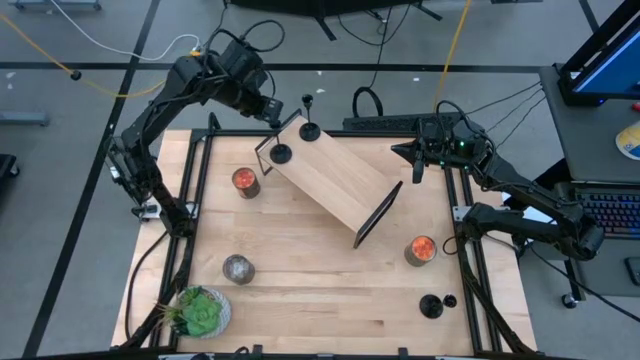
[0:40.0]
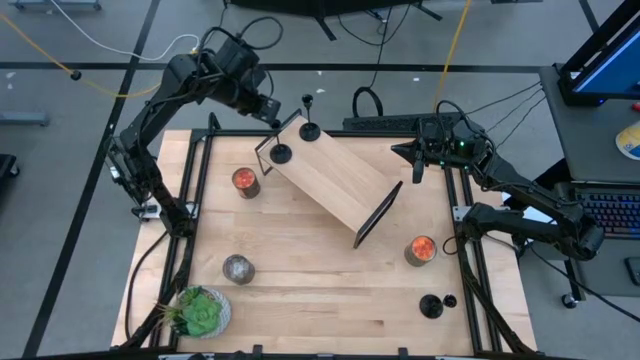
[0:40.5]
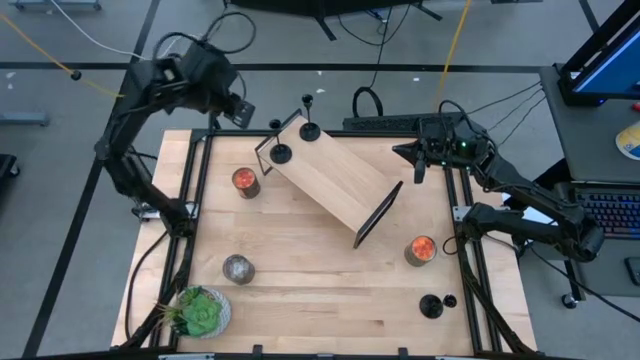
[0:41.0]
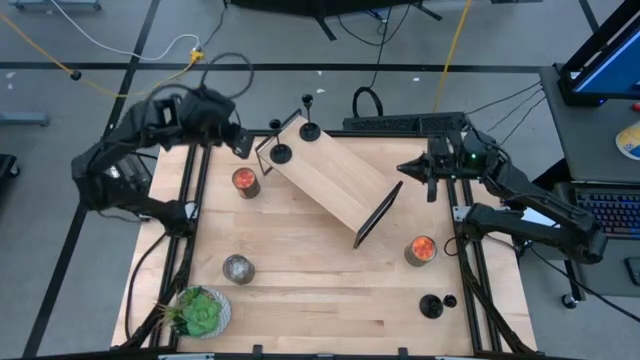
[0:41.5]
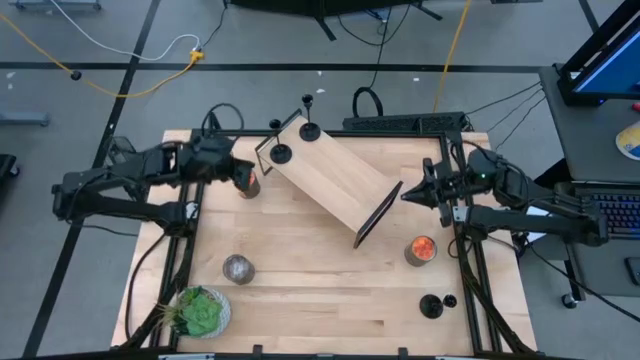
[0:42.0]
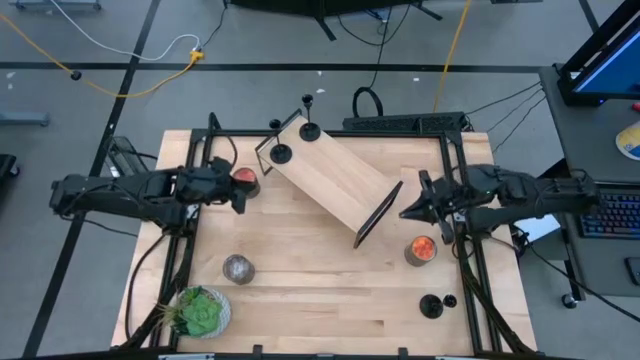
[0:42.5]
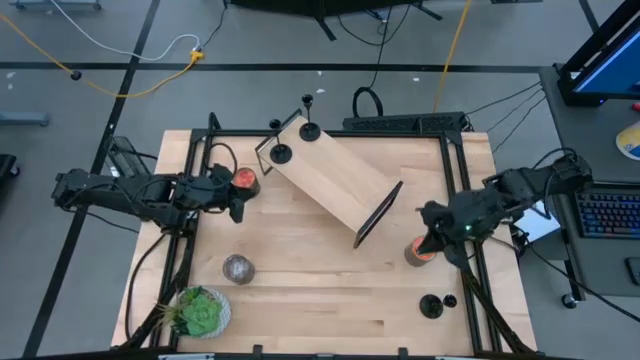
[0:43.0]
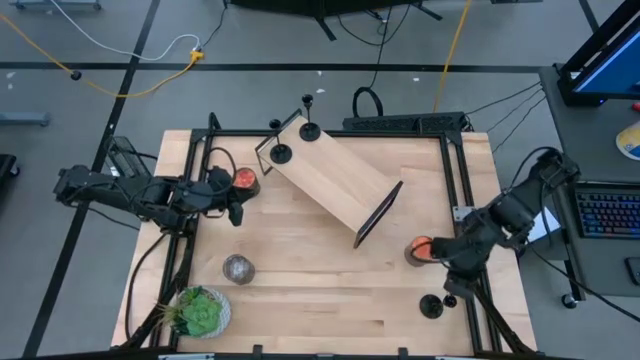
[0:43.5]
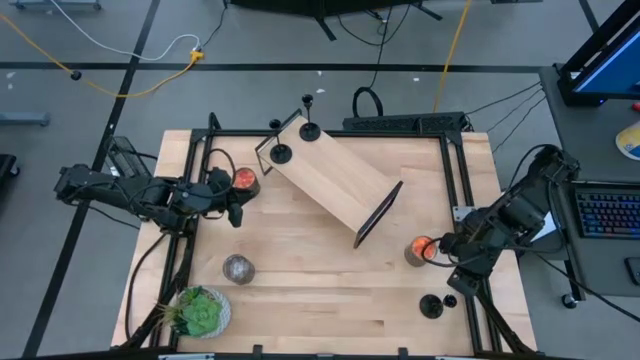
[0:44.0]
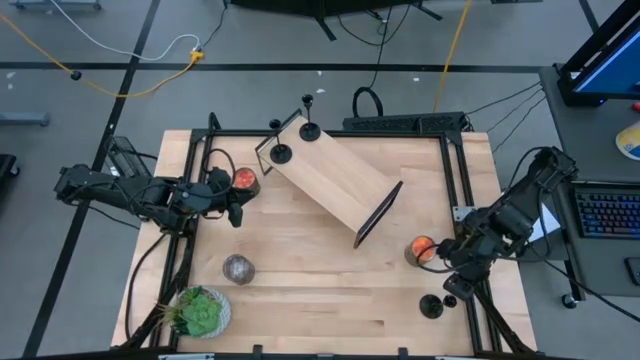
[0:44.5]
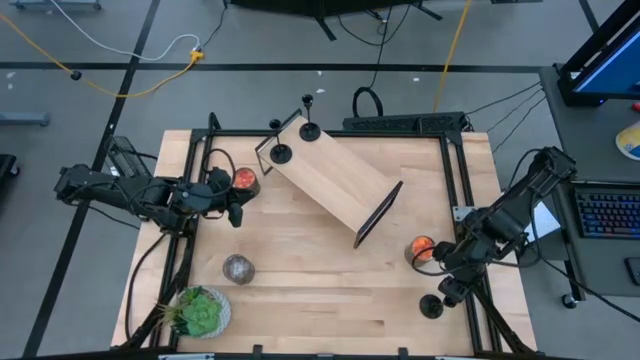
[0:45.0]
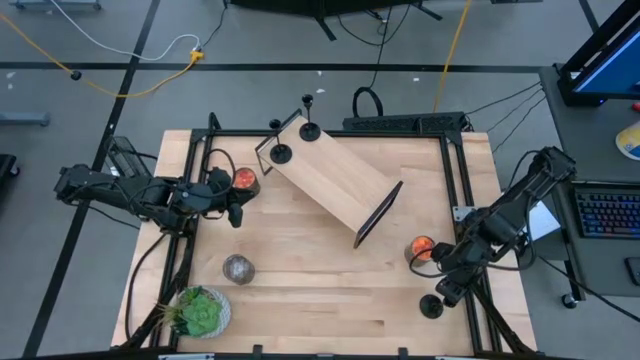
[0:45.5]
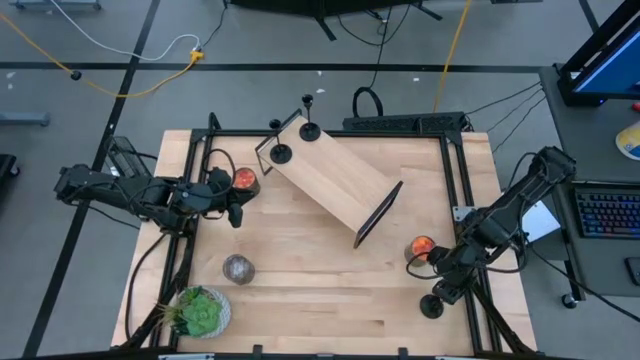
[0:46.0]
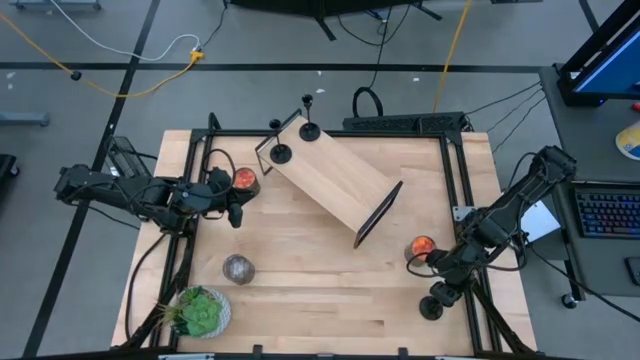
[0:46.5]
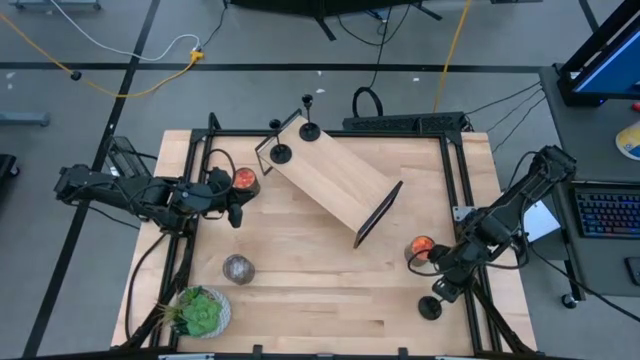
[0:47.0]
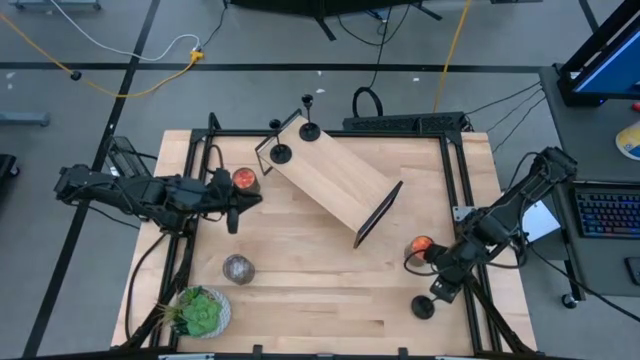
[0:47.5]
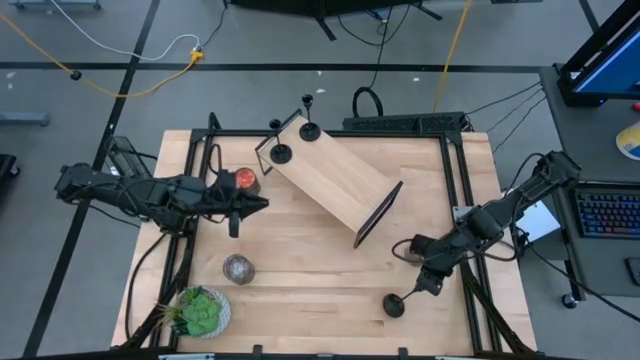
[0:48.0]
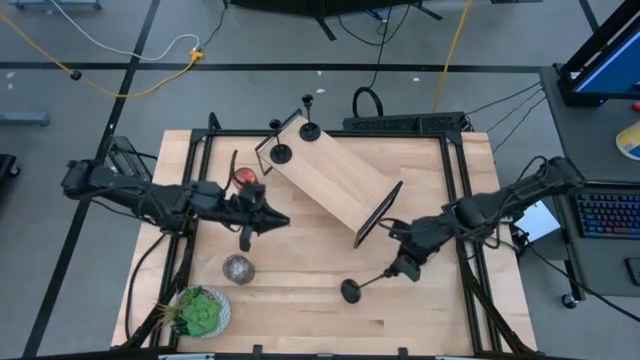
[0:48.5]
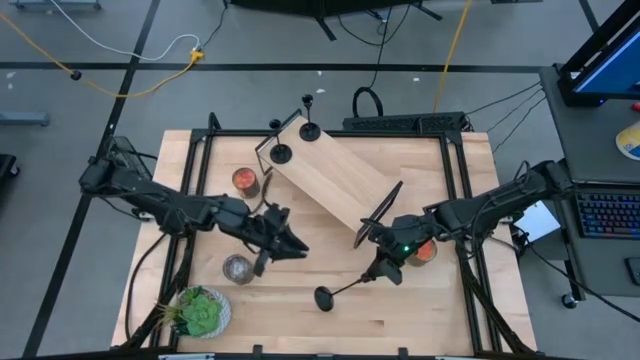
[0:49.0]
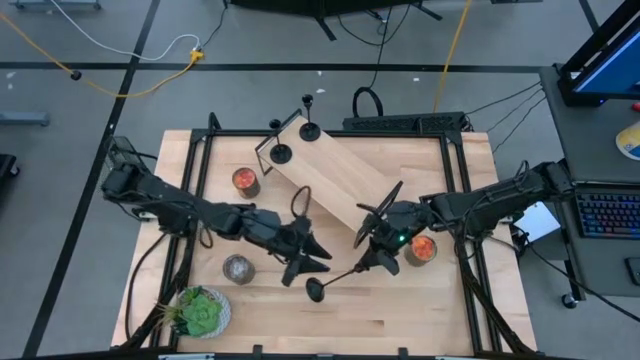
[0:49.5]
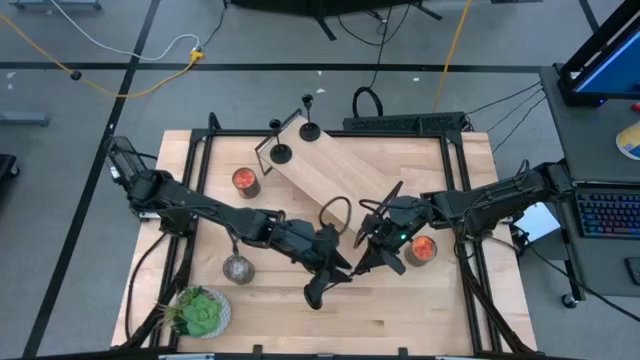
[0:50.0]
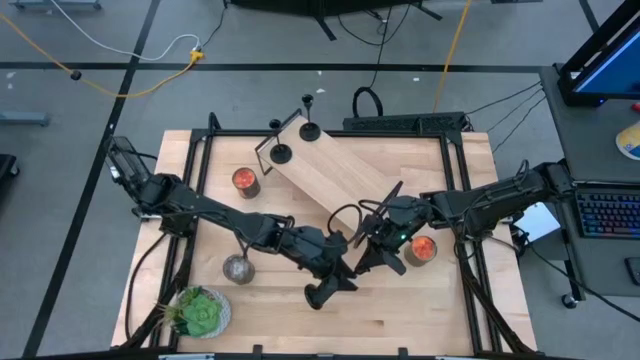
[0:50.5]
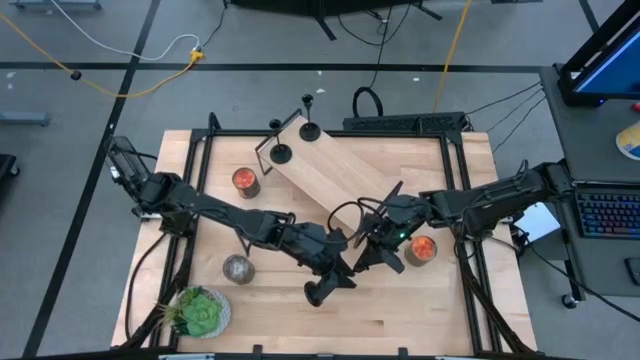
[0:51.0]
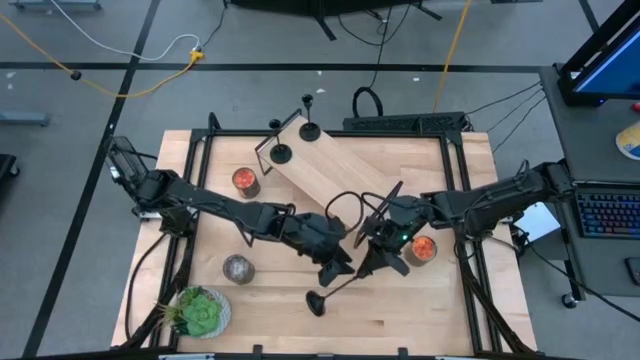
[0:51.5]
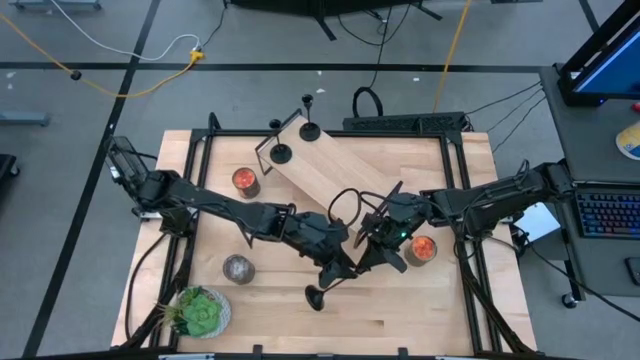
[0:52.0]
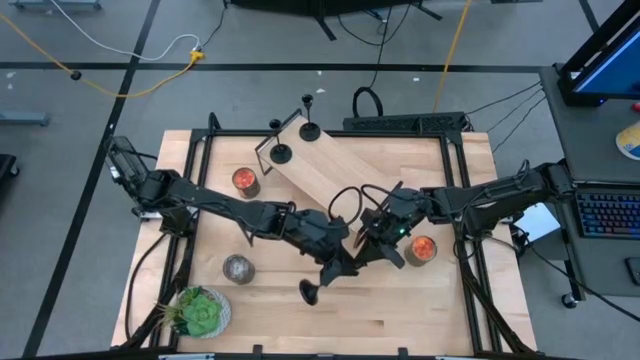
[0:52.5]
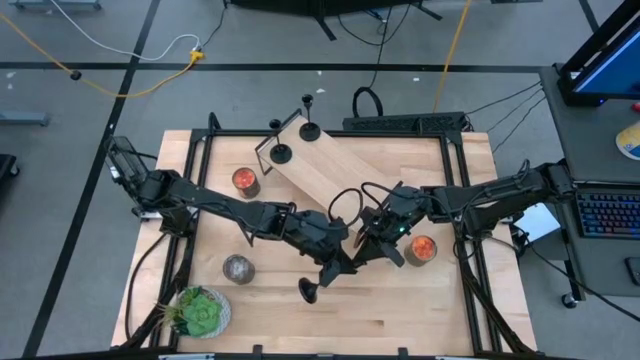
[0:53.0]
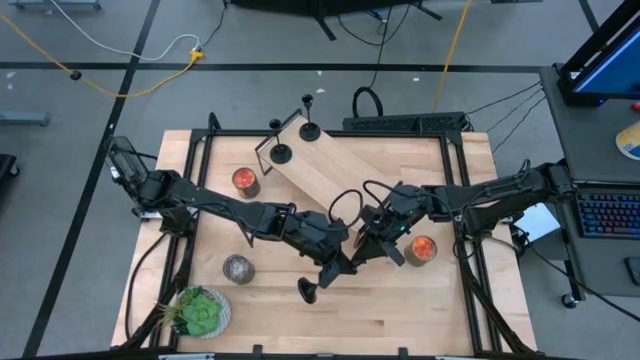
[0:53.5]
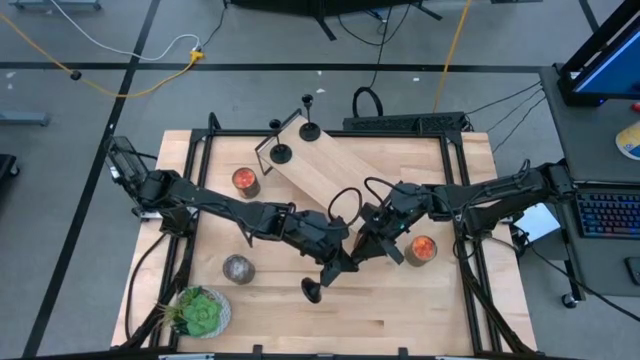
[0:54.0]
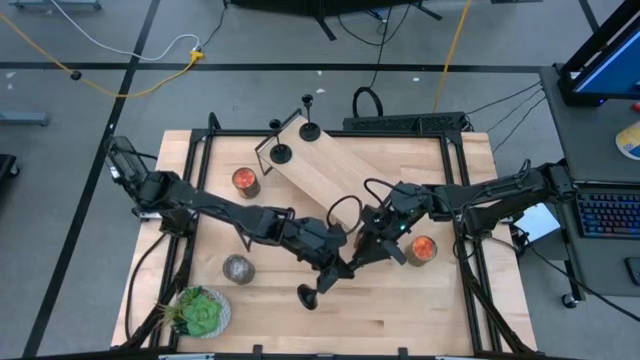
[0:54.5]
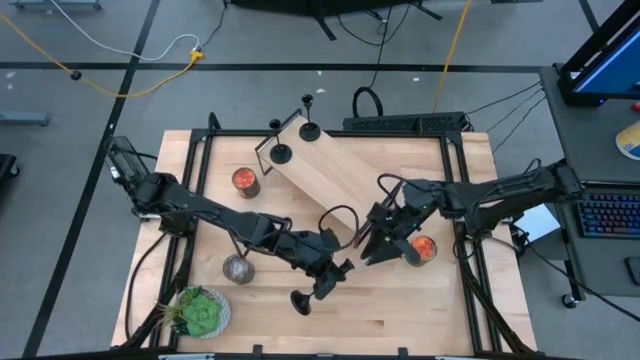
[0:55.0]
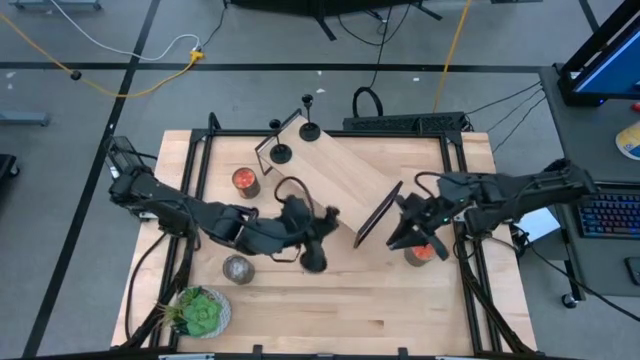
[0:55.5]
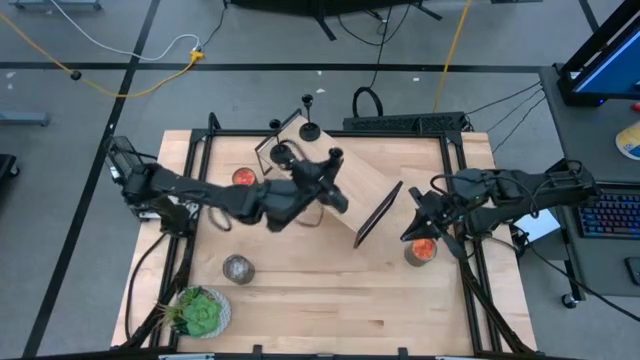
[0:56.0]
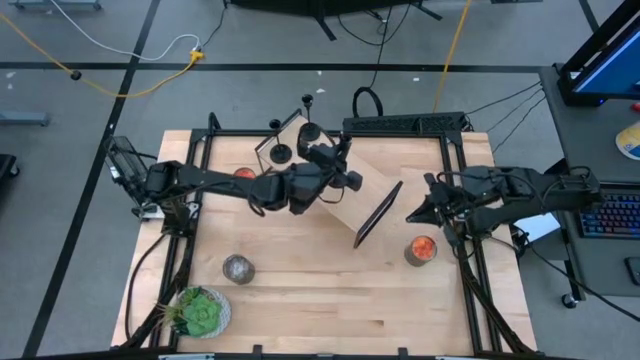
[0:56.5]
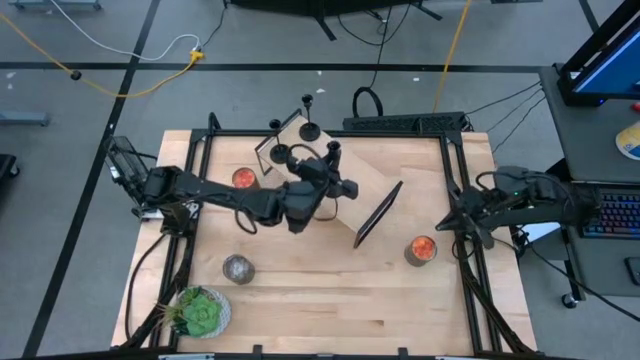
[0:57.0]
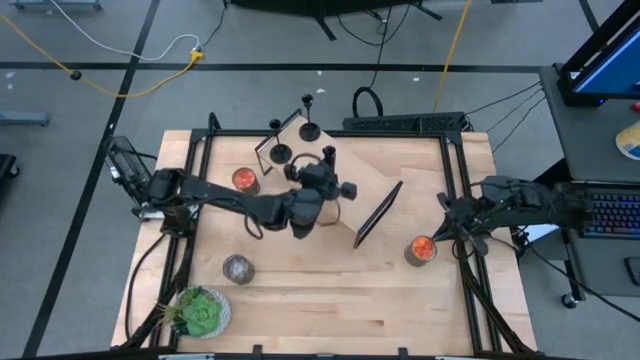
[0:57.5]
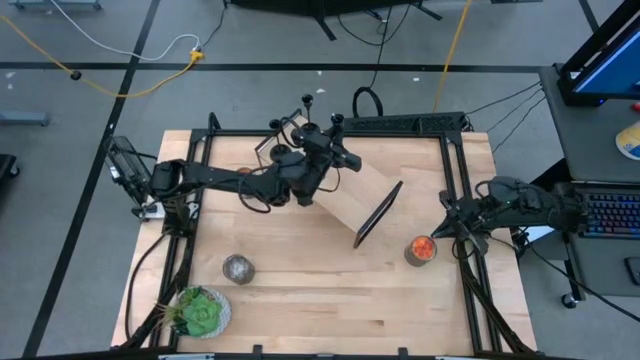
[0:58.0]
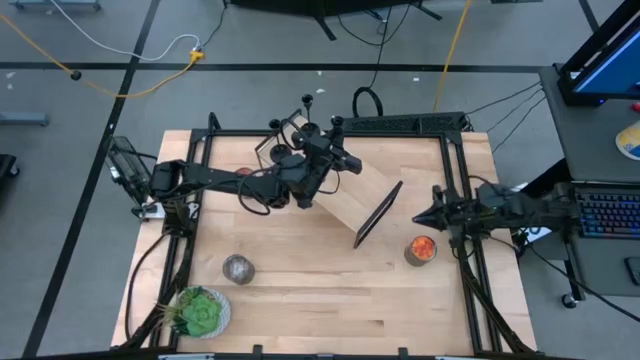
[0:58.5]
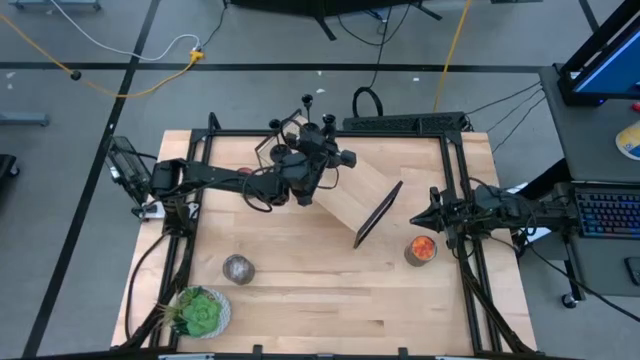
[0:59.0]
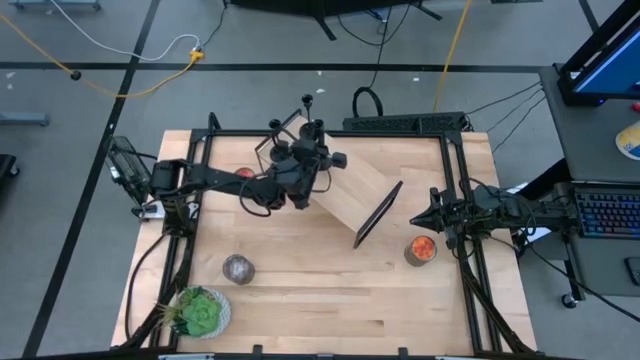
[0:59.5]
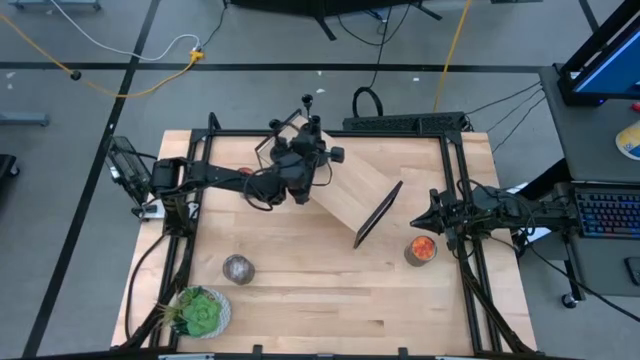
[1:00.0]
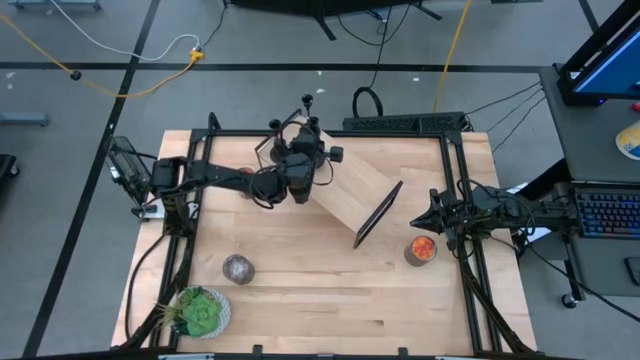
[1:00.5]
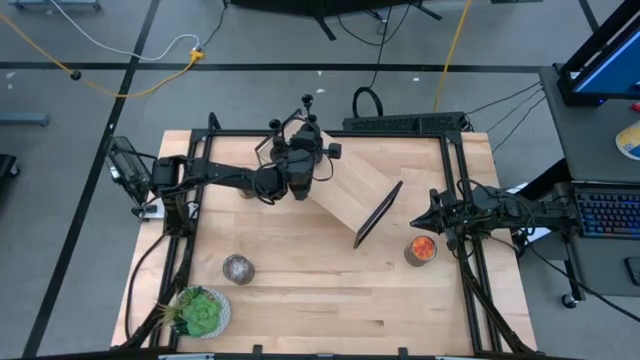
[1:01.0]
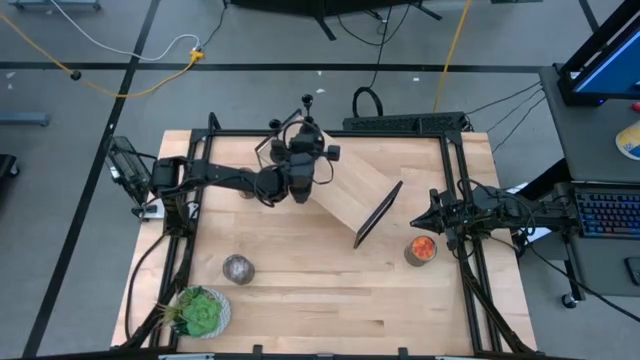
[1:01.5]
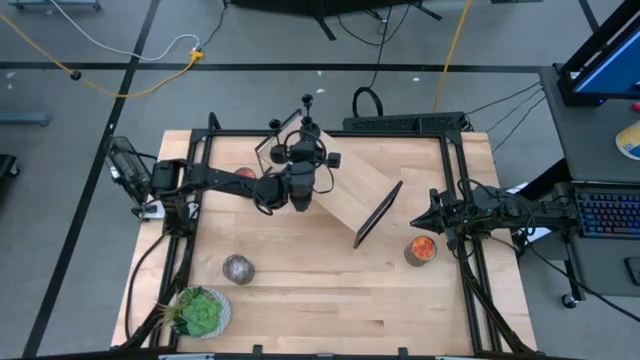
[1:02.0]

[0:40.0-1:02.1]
Task: Pick & Place candle stick holders
Put the black candle holder on the shelf
